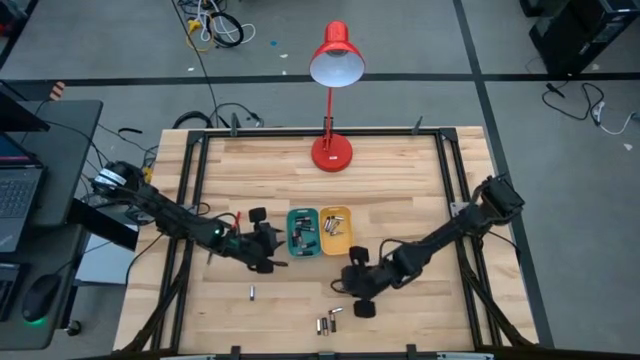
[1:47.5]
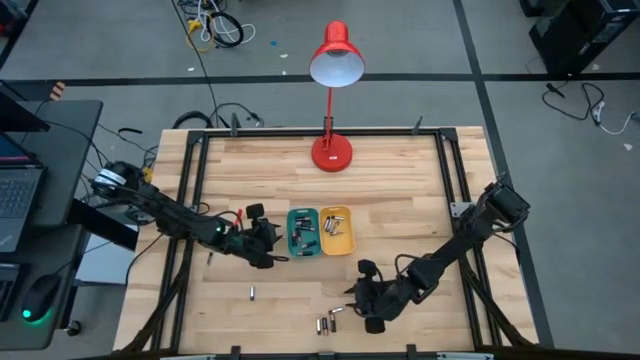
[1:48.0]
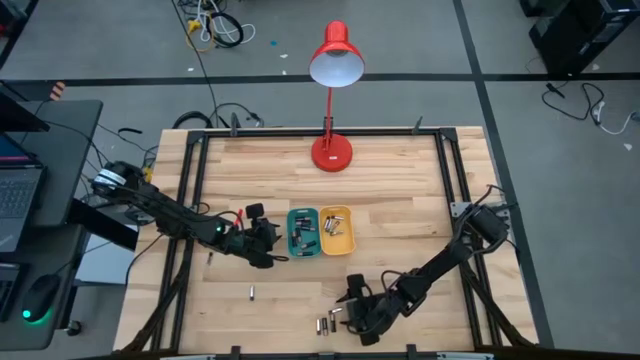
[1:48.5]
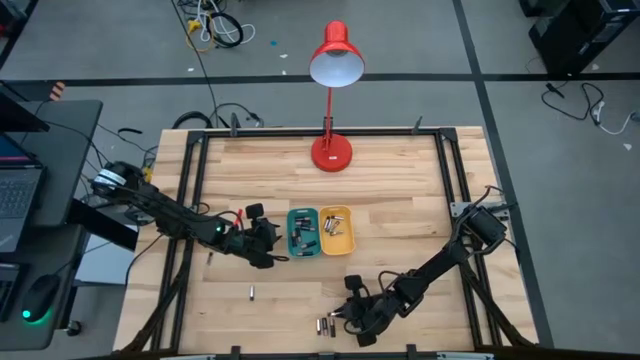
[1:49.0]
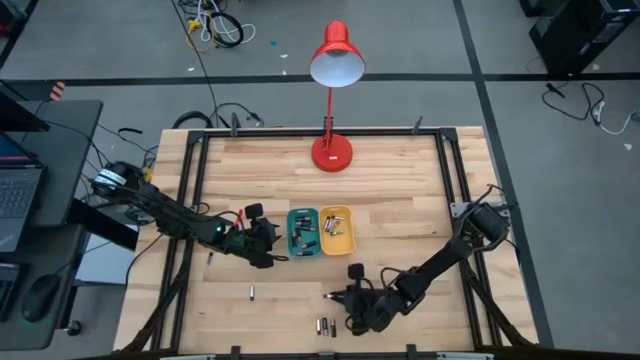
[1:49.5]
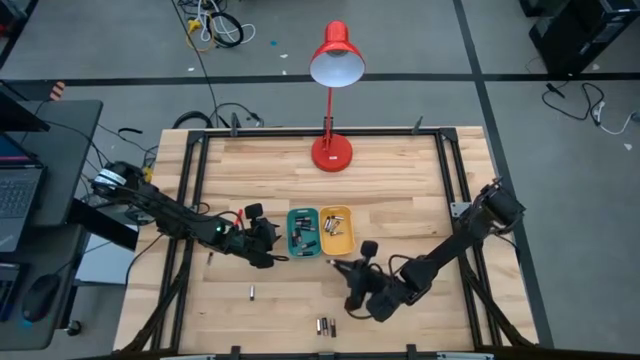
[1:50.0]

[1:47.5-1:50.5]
Task: Sort batteries
Put the white battery into the yellow bin

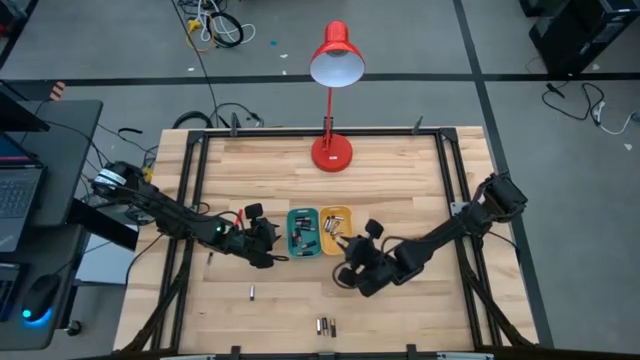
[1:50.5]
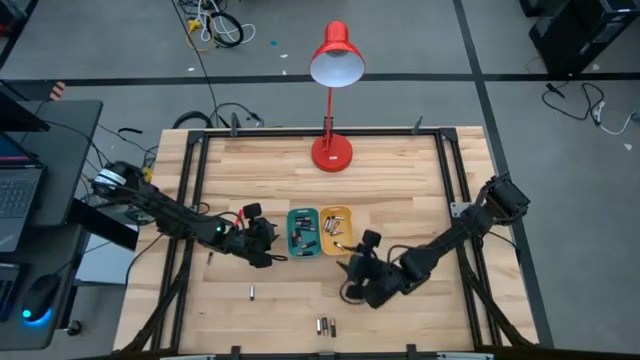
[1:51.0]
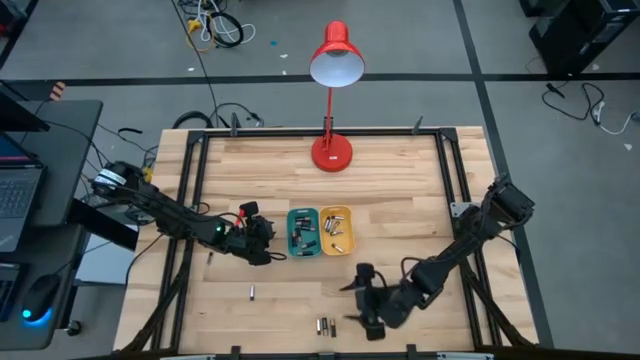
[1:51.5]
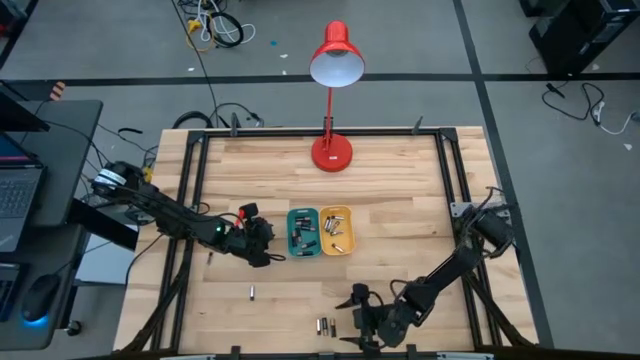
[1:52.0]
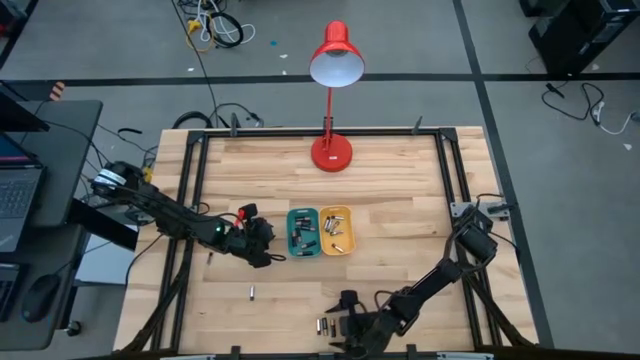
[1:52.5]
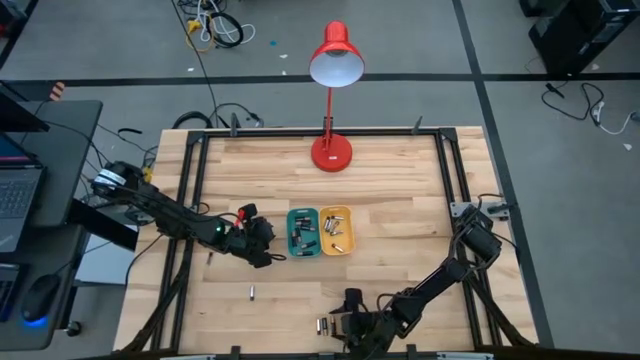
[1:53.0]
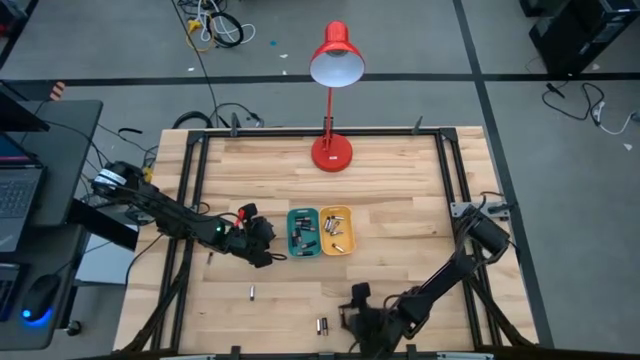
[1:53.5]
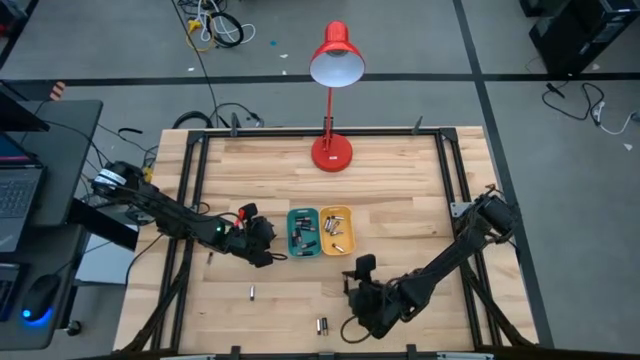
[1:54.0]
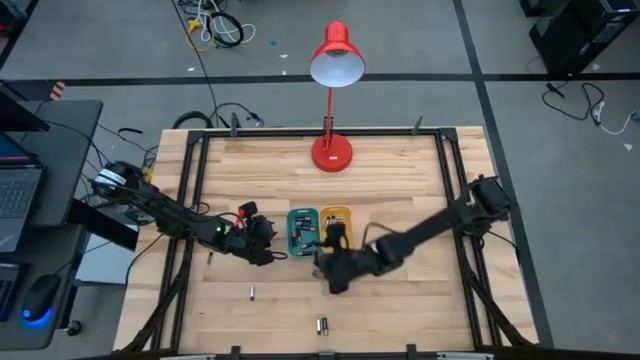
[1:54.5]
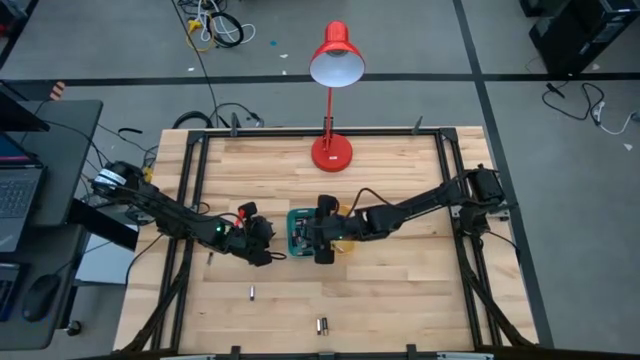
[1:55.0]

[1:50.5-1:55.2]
Put the black battery into the blue bin

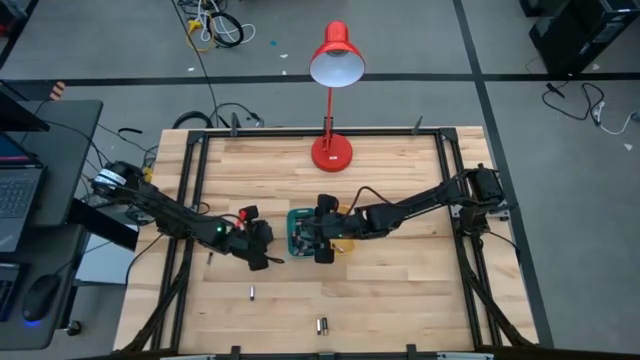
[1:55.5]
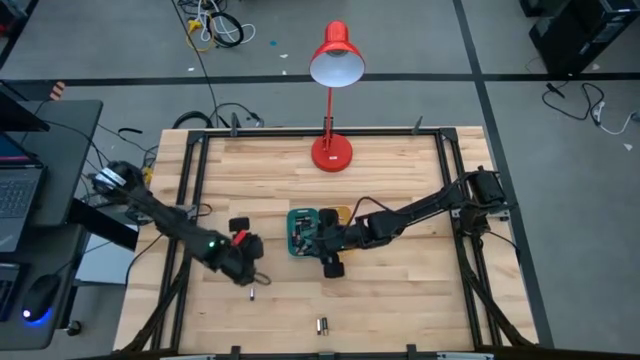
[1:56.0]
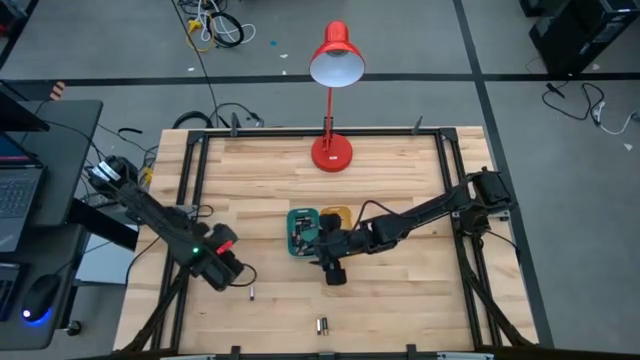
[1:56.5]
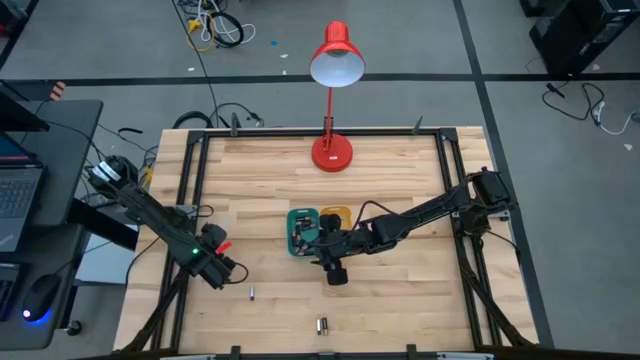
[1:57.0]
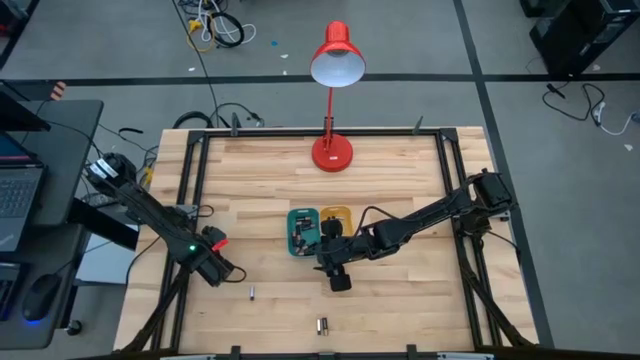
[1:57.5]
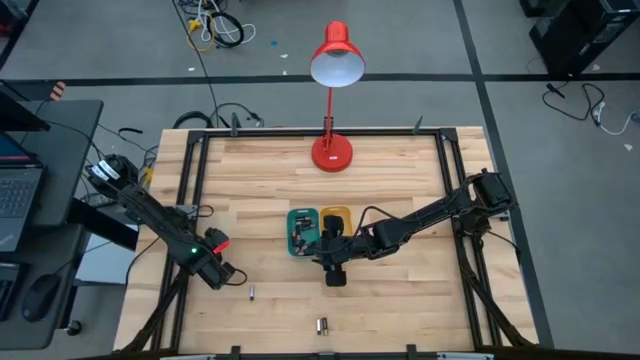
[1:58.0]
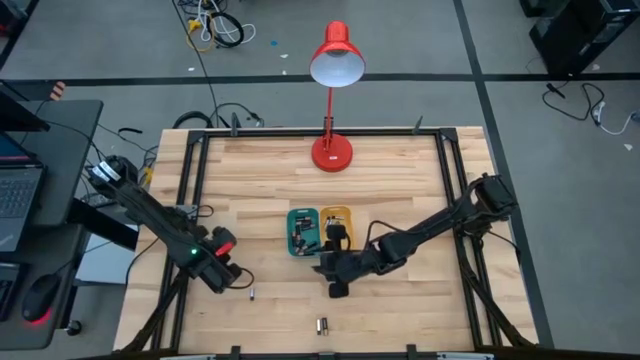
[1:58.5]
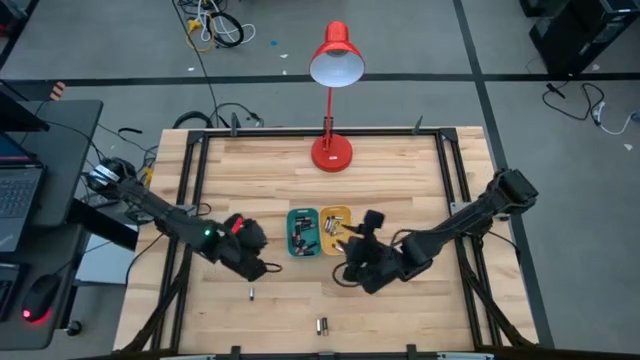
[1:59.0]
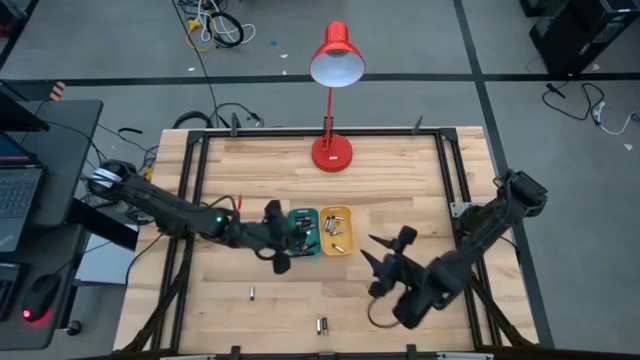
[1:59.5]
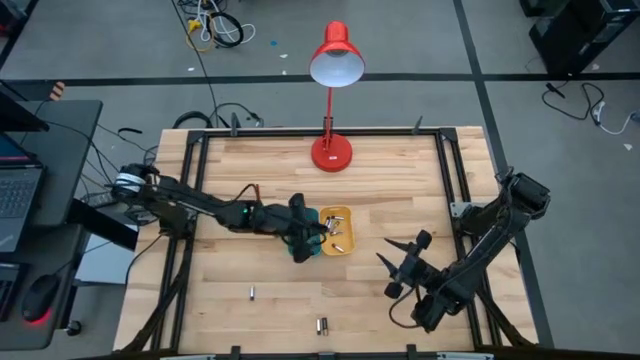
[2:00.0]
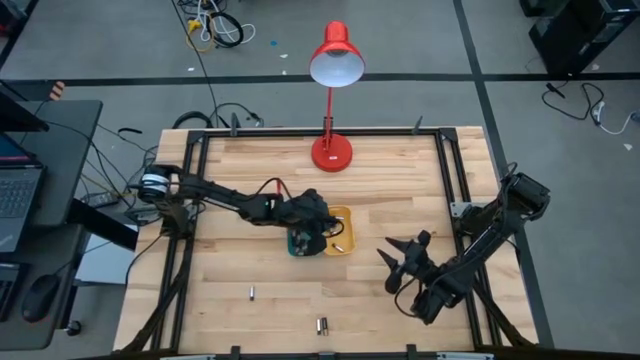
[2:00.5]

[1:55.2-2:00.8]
Put the white battery into the yellow bin

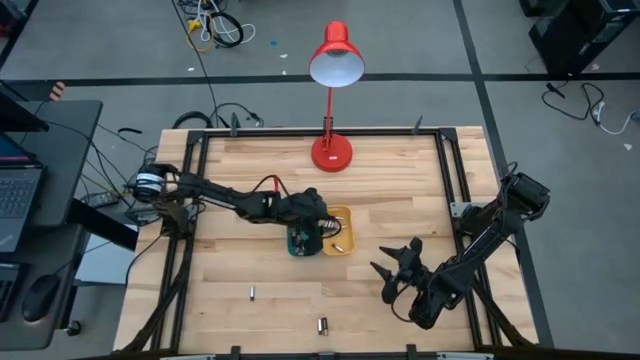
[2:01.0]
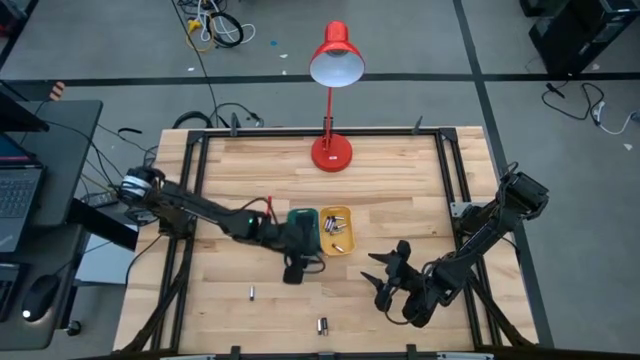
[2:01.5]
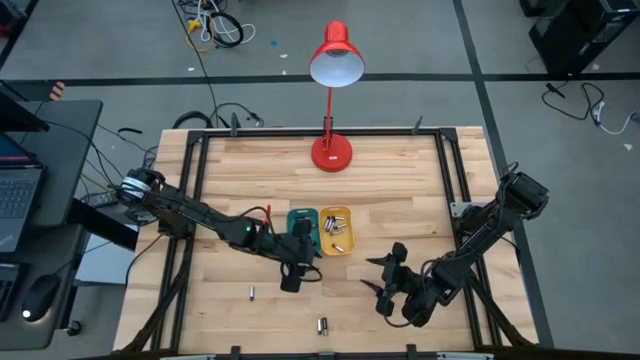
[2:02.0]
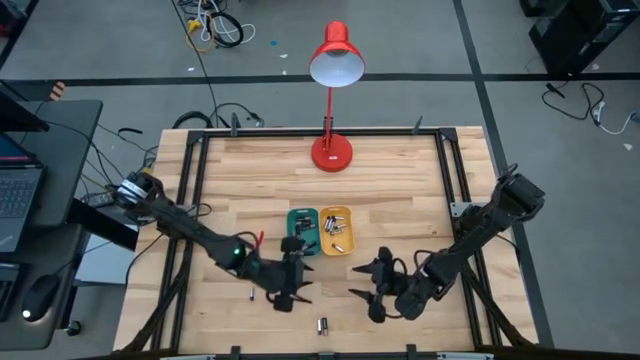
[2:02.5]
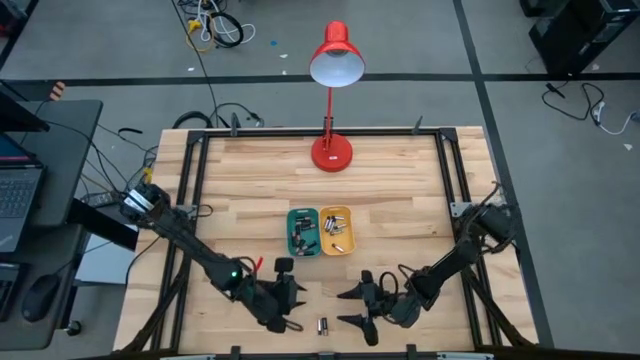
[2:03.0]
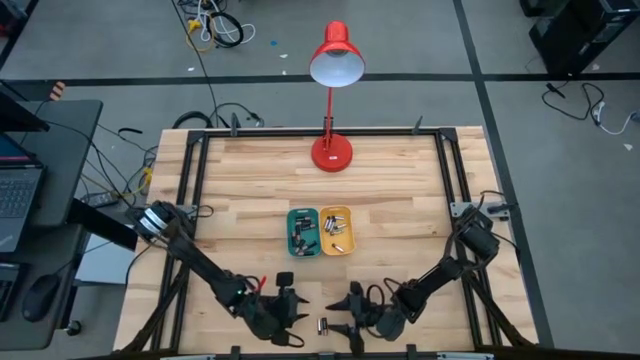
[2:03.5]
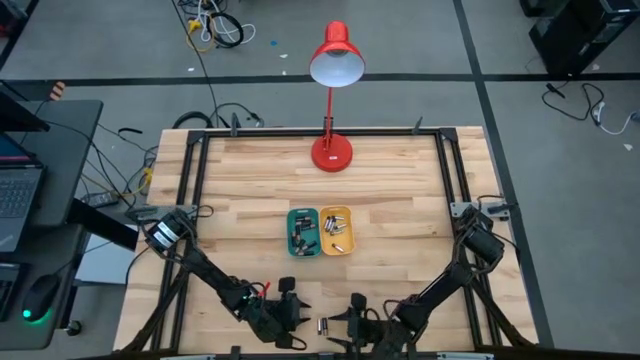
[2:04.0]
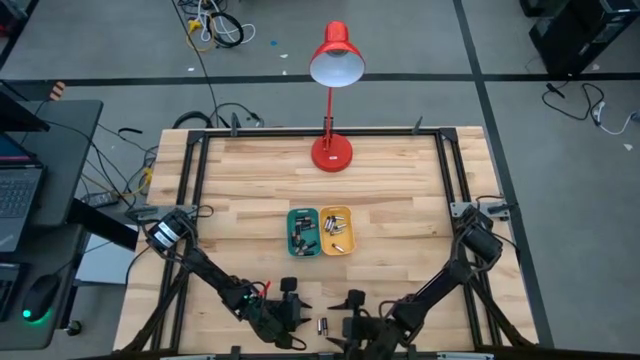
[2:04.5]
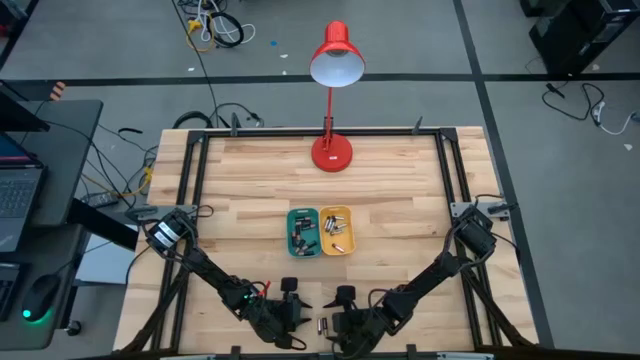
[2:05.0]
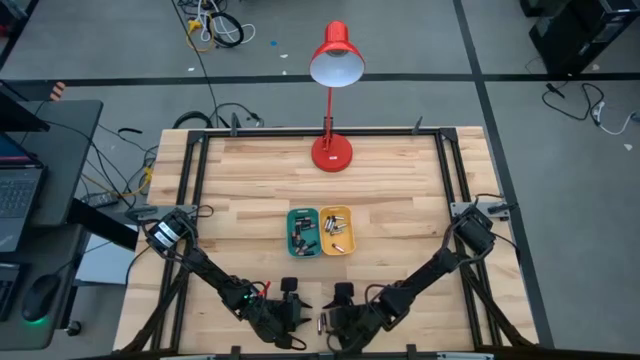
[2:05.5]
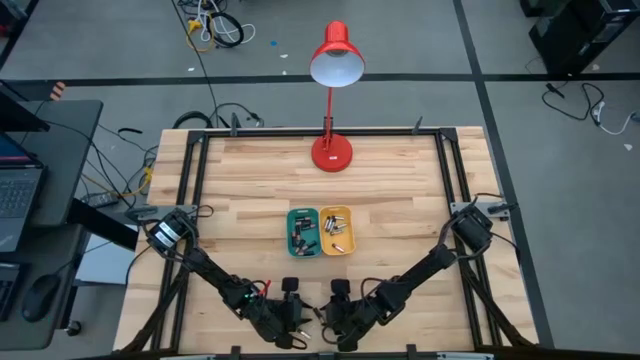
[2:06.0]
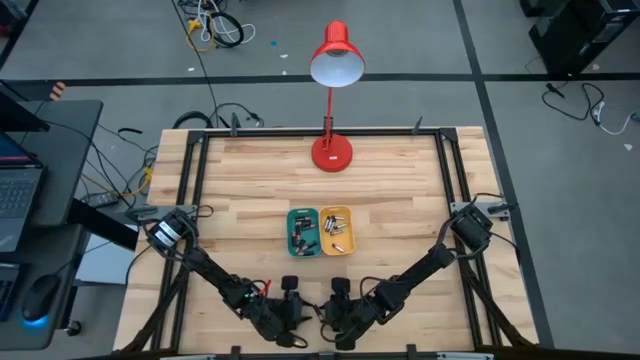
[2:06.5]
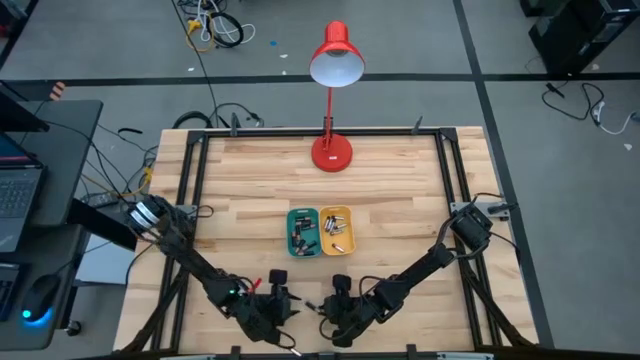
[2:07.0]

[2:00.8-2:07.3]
Put the black battery into the blue bin

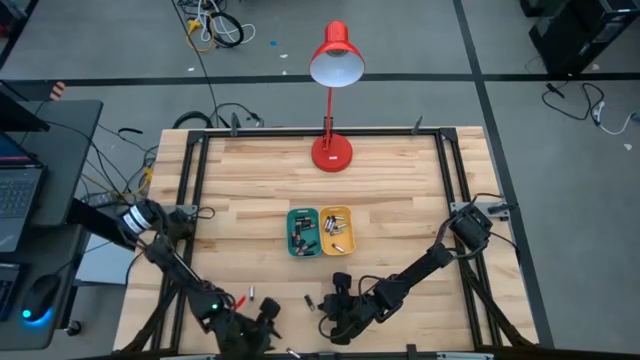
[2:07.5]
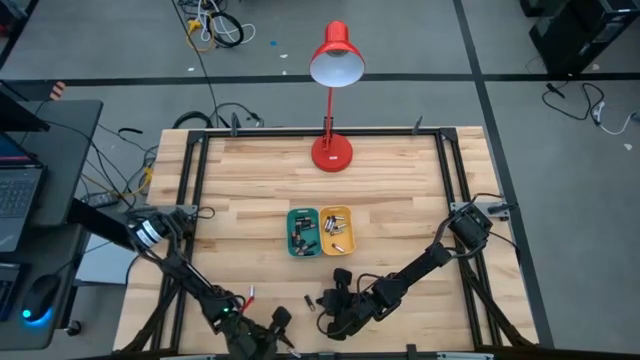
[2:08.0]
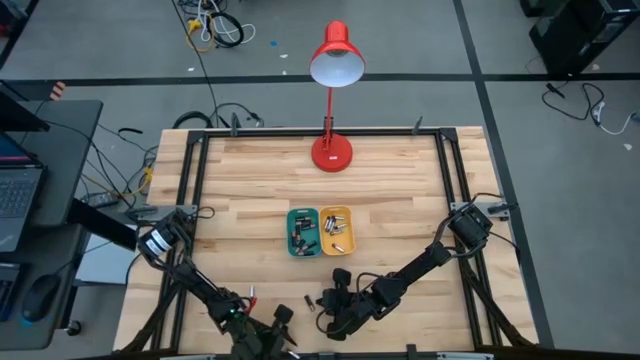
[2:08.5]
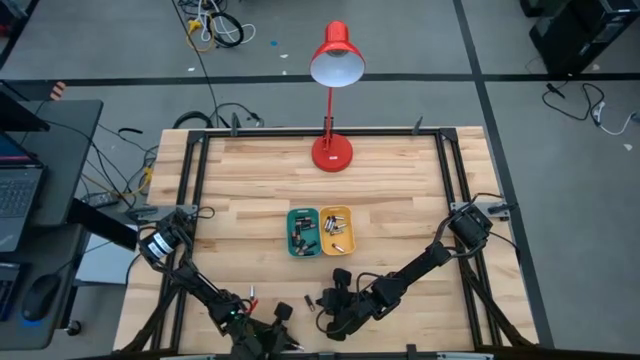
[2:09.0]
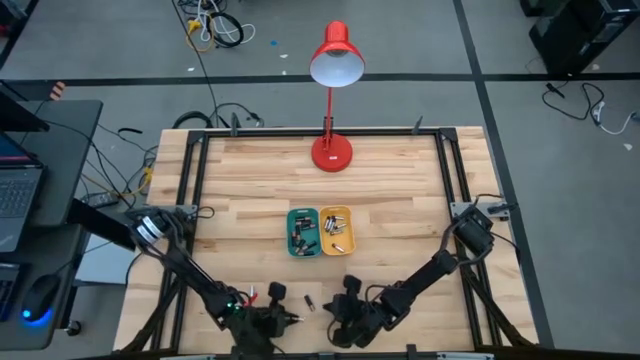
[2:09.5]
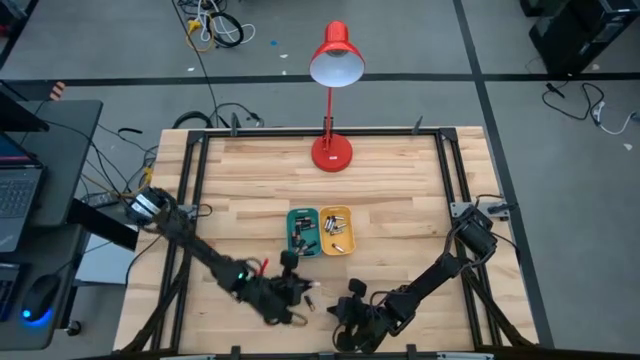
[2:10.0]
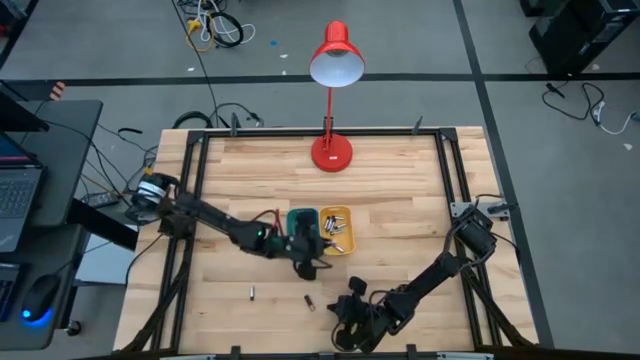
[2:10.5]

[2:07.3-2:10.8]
Put the white battery into the yellow bin
